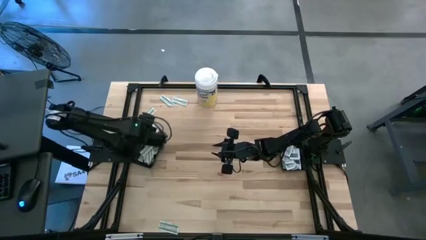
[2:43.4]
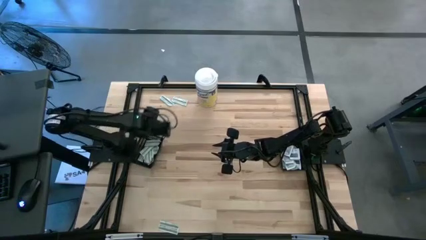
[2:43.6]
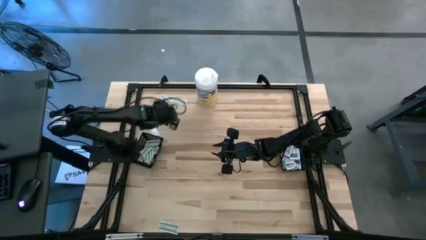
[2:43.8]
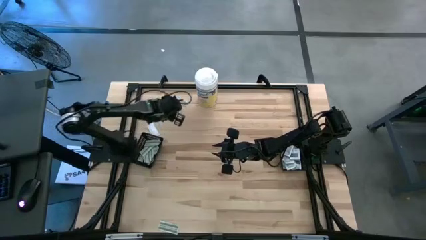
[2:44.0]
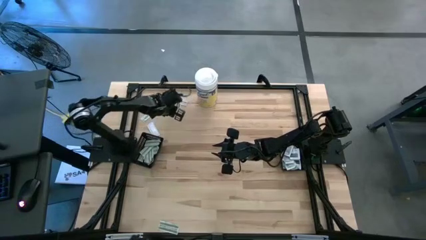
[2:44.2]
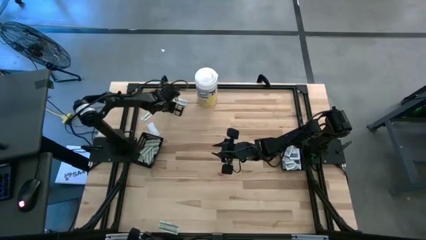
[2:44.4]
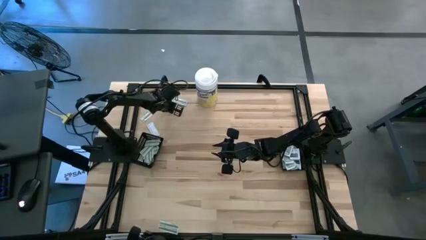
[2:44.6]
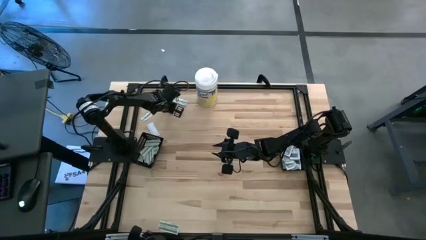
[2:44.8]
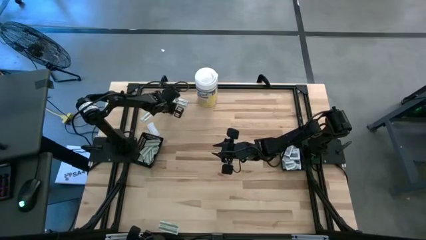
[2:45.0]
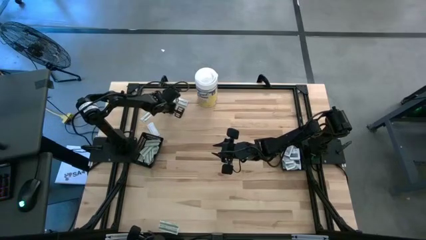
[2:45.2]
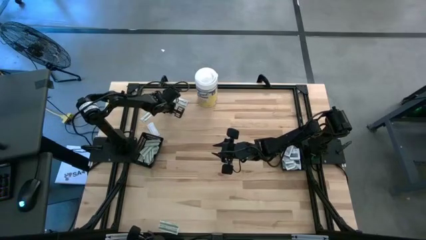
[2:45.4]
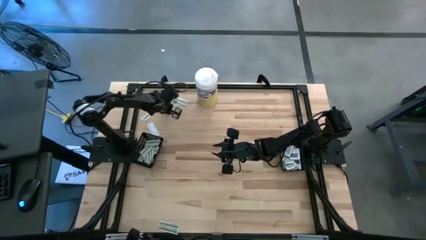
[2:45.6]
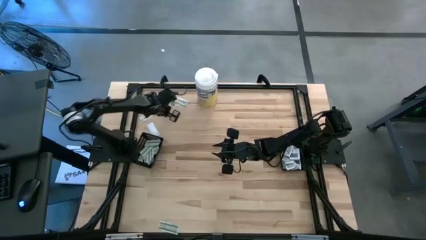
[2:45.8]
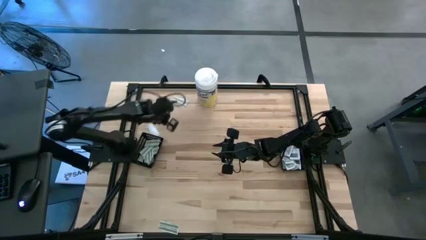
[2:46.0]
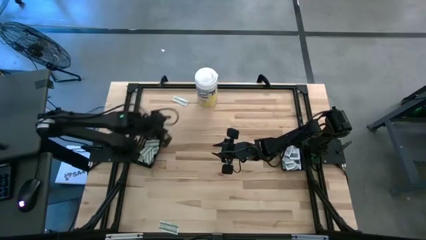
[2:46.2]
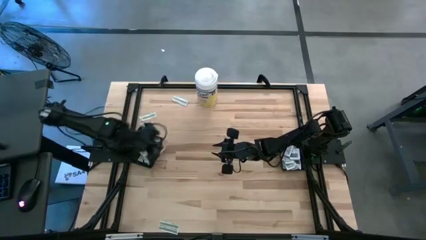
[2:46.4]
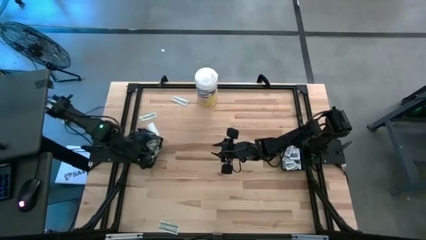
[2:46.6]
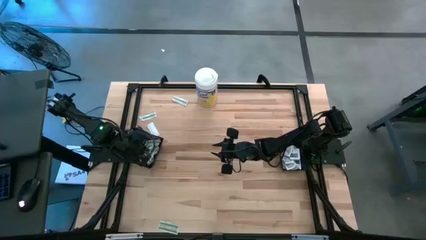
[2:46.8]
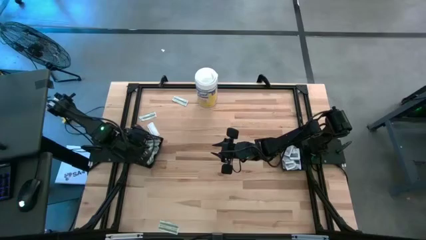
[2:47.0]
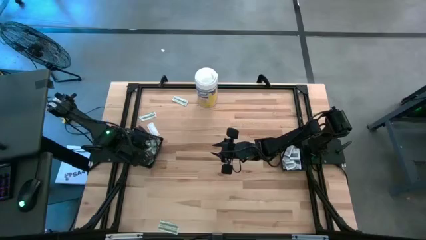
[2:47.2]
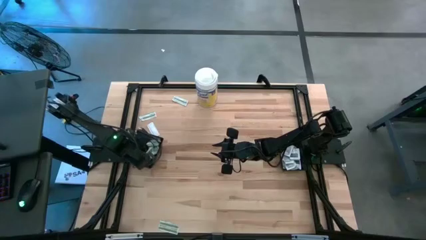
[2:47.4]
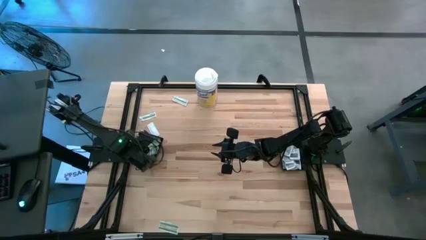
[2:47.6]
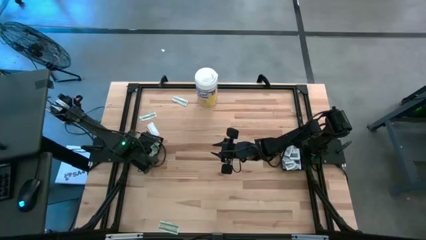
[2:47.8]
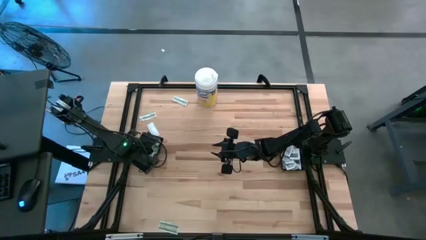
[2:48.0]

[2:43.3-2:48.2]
Task: Pick & Place First Aid Supplies
Put the bandage into the left black basket

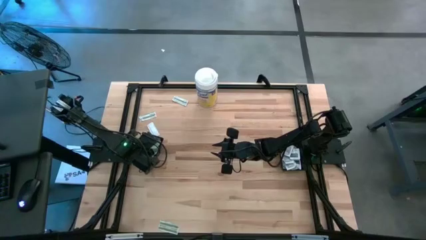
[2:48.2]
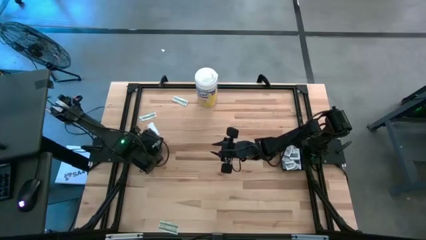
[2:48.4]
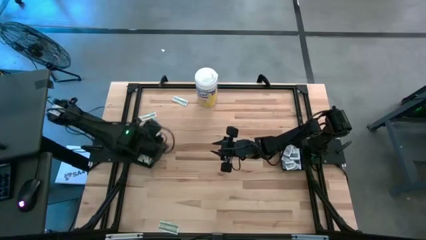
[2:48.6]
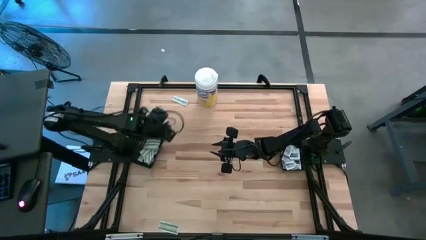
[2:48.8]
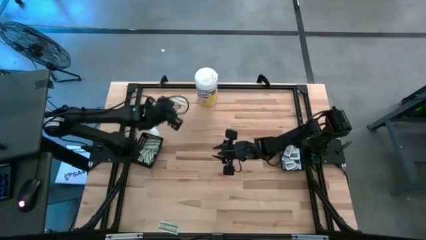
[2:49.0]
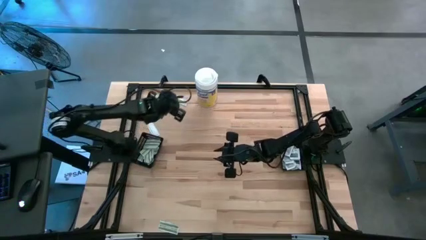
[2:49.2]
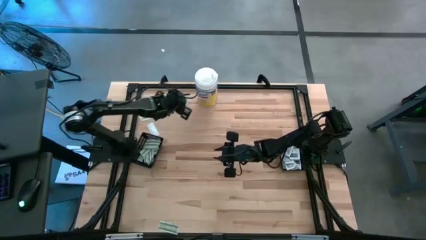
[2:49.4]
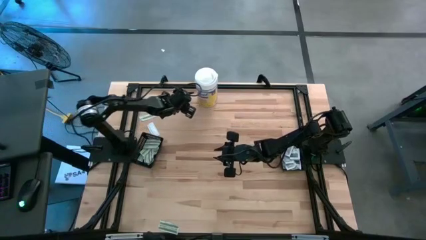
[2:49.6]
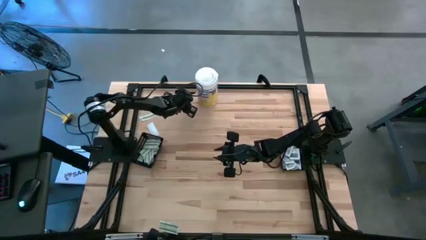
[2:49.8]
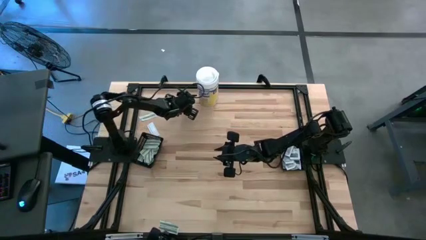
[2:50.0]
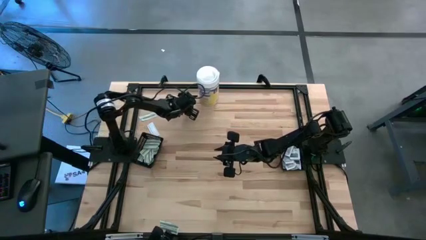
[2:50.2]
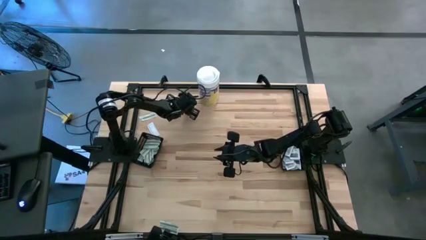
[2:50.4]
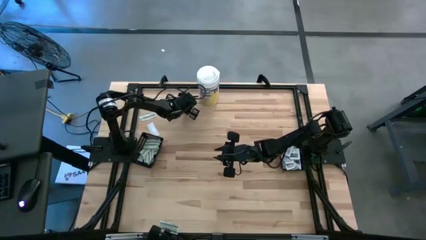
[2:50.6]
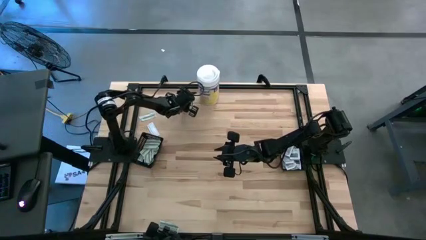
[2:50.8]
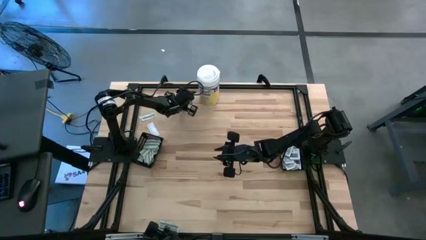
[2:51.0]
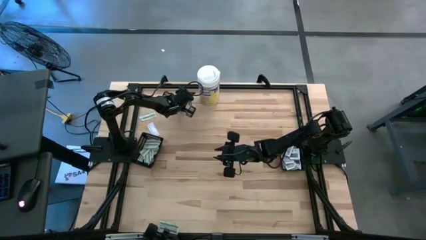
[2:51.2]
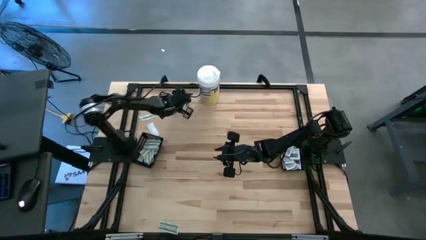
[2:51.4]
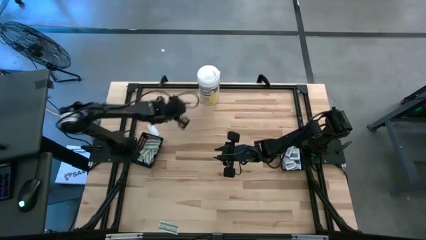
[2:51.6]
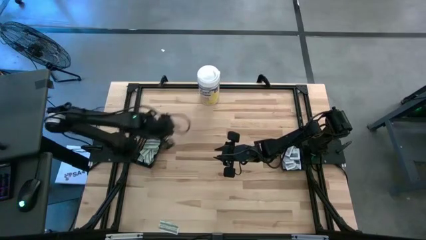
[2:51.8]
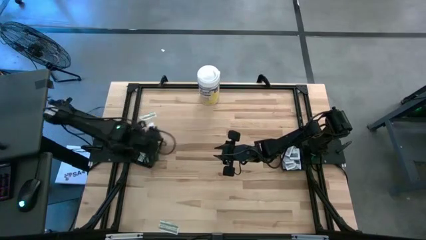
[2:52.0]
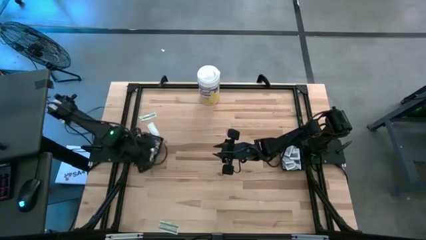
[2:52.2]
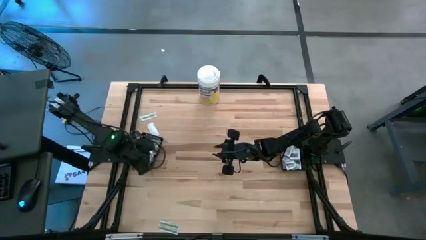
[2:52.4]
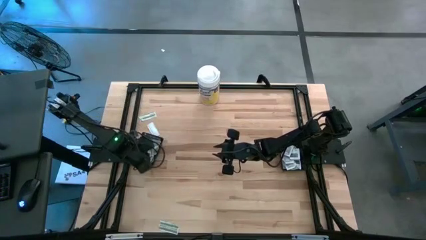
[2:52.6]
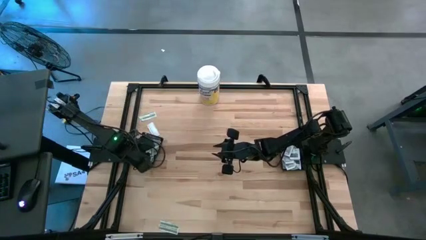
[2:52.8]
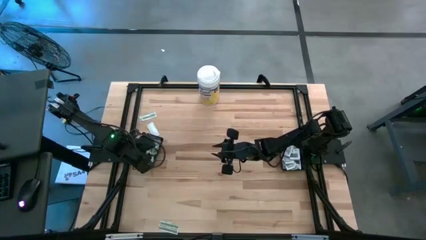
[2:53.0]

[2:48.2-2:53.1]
Put the bandage into the left black basket

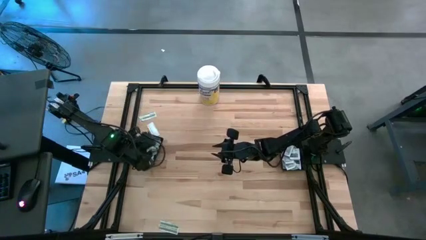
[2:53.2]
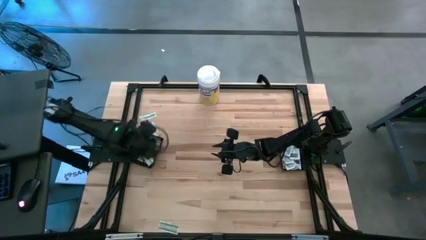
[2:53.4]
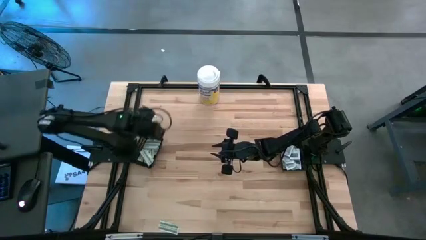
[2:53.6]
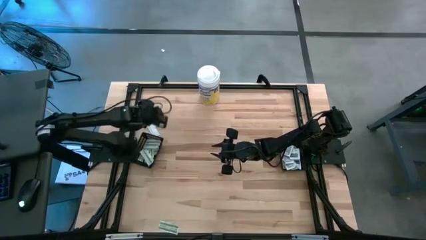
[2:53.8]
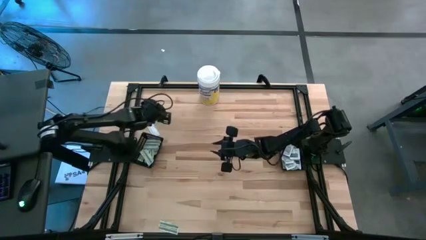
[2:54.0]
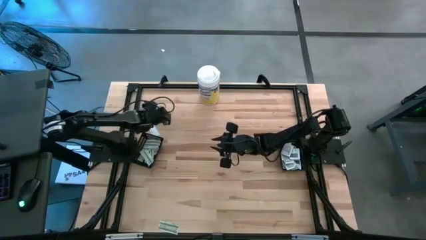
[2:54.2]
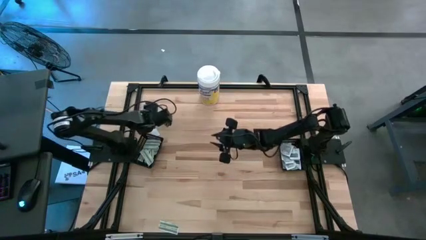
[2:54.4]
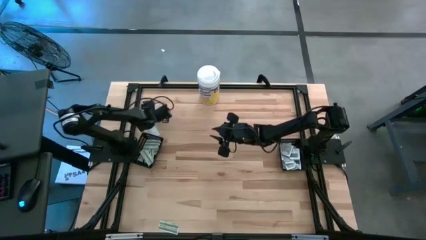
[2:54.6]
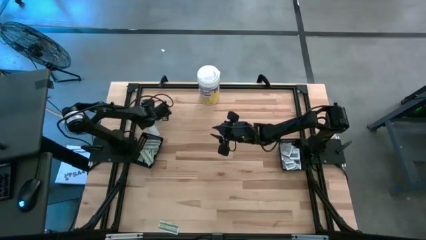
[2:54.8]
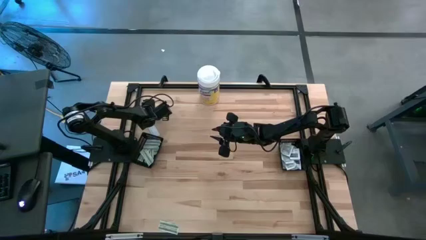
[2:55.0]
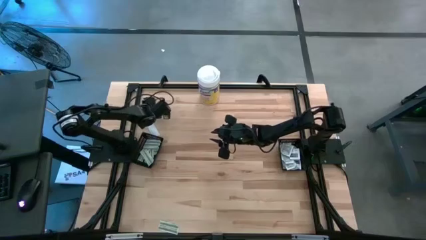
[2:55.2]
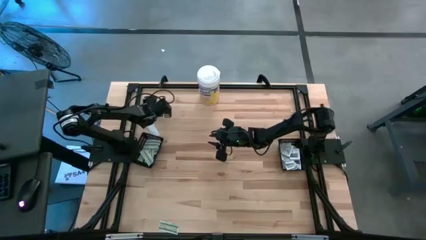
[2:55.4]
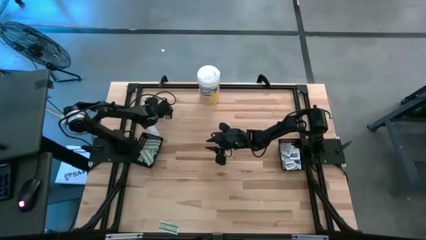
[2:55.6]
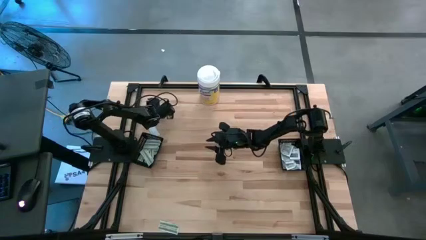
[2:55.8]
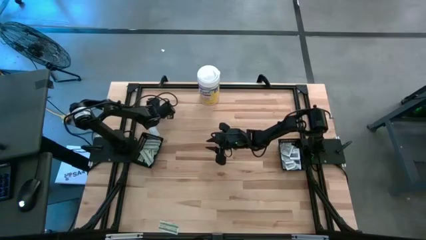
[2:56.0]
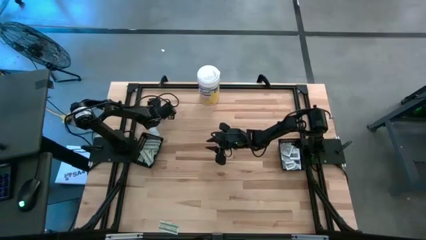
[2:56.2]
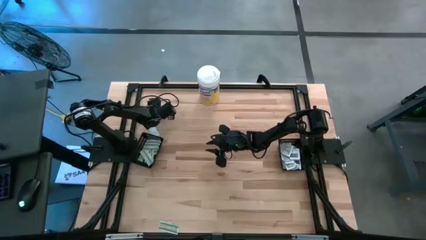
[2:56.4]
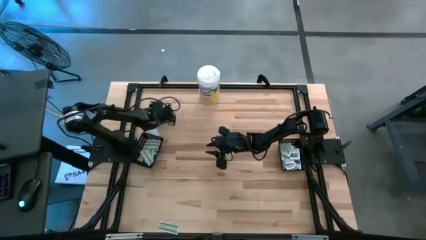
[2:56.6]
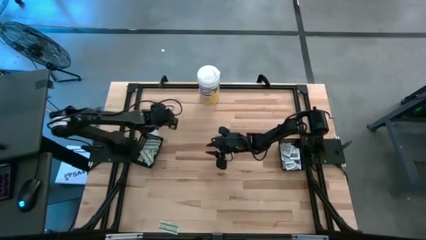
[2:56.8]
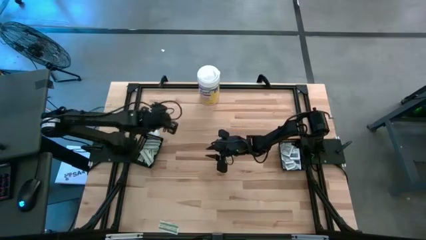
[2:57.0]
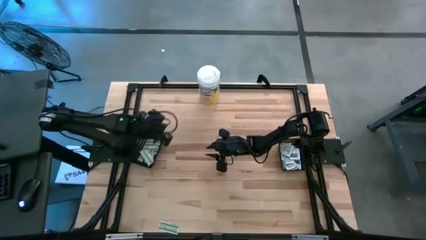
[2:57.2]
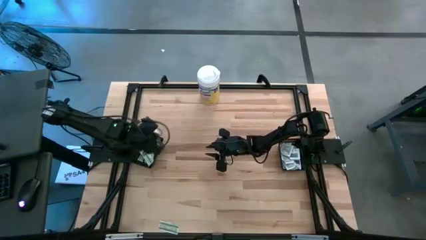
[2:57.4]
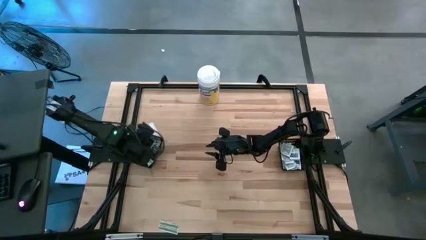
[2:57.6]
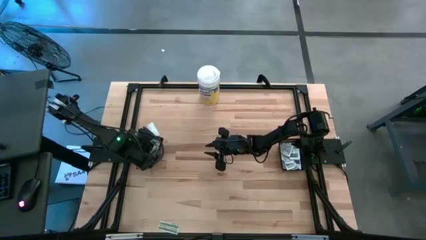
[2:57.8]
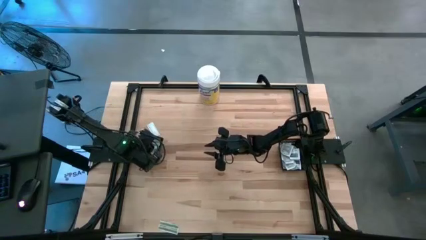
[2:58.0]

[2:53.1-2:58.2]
Put the bandage into the left black basket

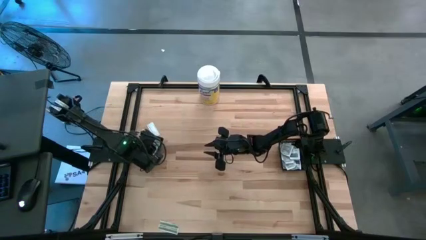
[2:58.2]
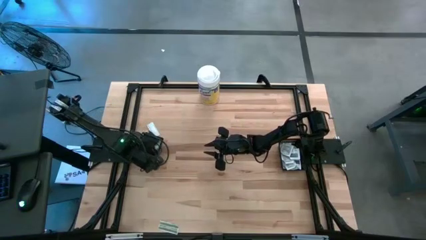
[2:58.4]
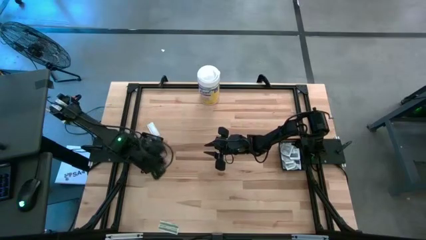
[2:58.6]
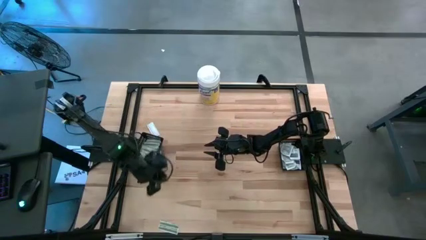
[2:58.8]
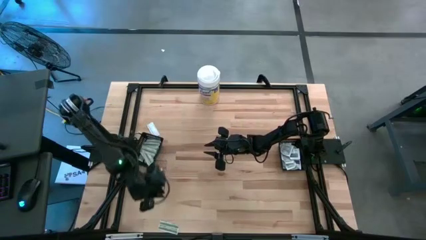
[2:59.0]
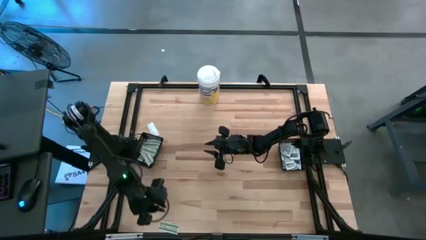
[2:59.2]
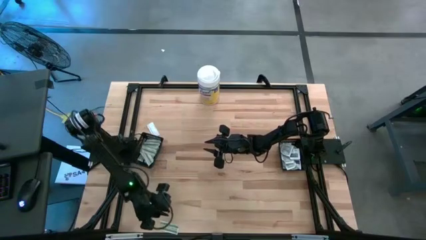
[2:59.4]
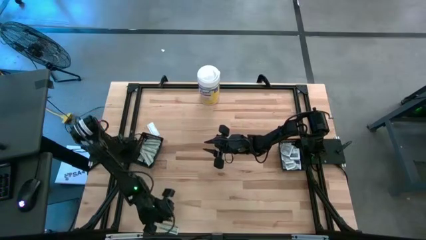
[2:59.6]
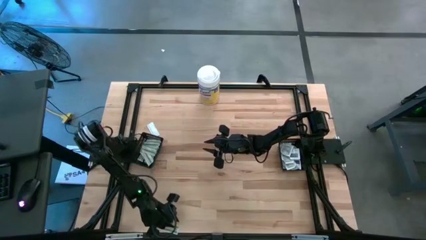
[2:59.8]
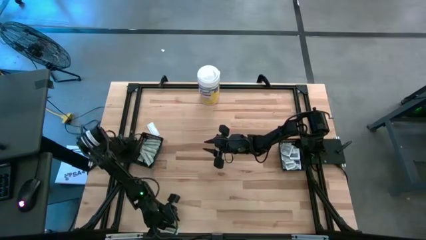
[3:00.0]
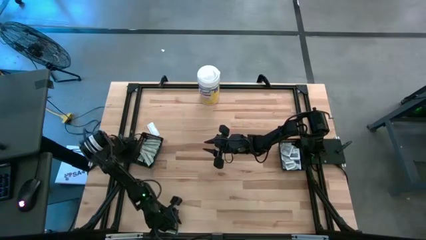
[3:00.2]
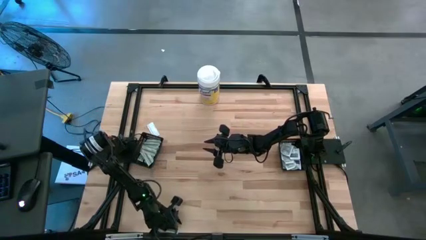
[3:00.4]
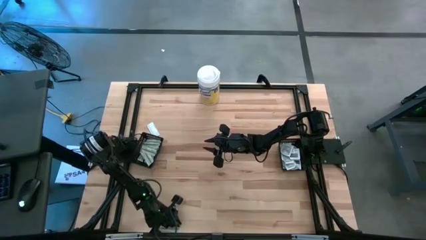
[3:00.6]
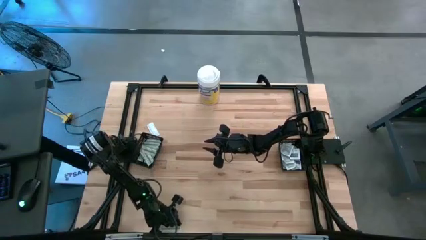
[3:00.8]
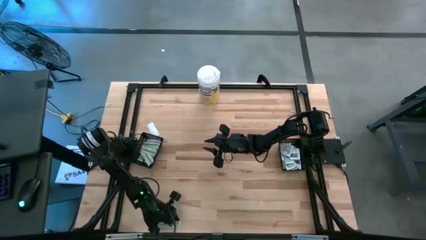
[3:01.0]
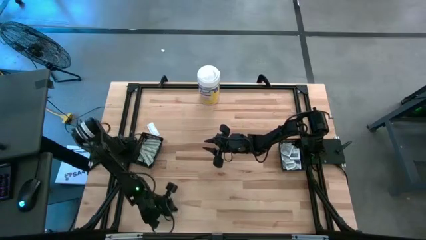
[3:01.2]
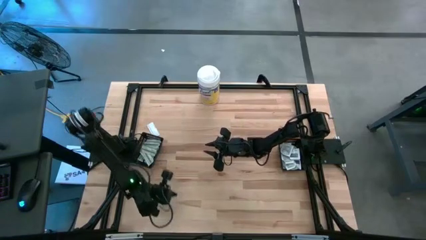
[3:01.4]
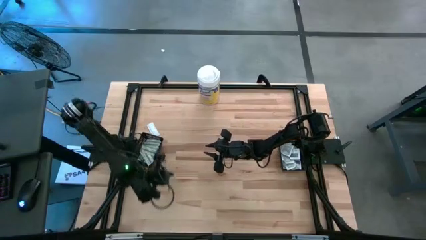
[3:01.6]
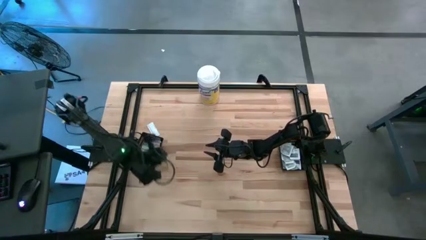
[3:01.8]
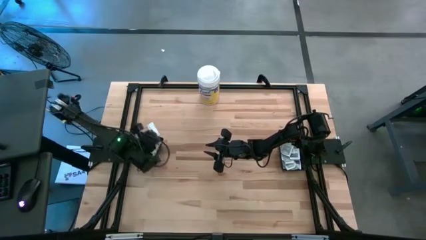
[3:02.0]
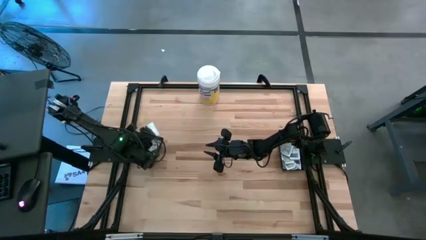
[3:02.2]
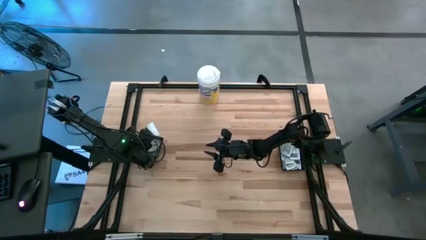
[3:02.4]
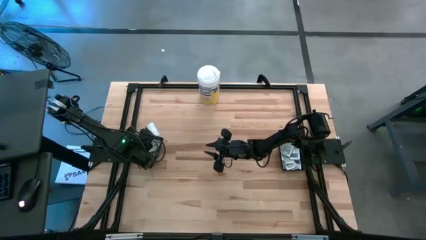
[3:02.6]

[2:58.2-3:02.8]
Put the bandage into the left black basket
